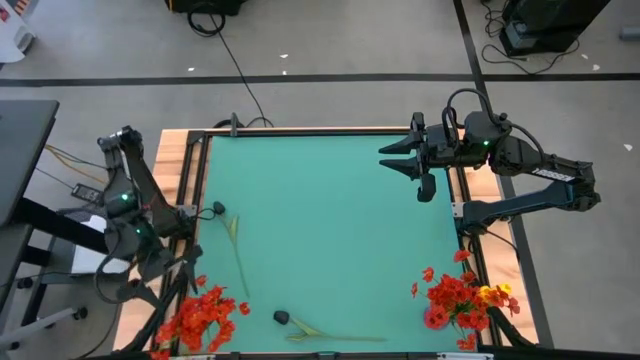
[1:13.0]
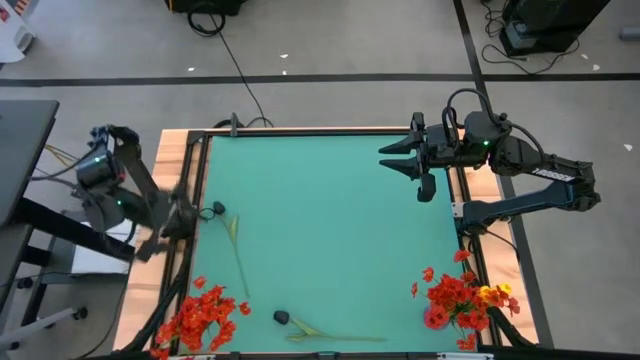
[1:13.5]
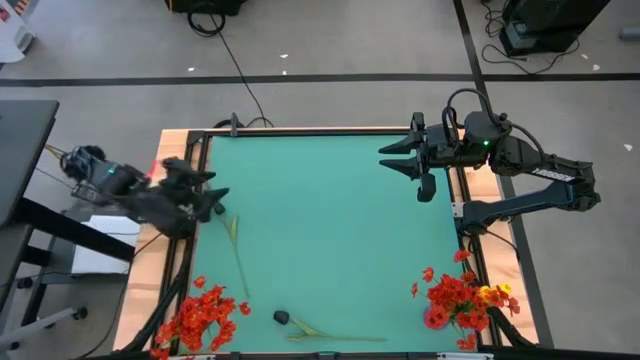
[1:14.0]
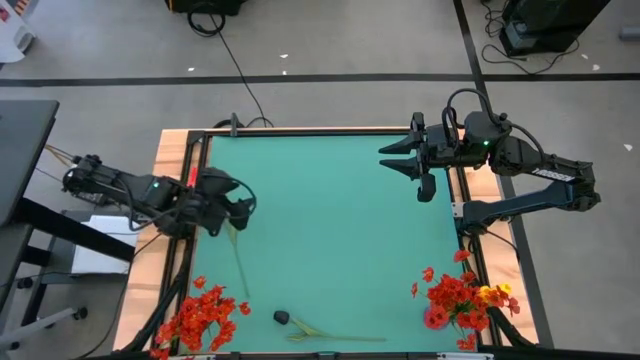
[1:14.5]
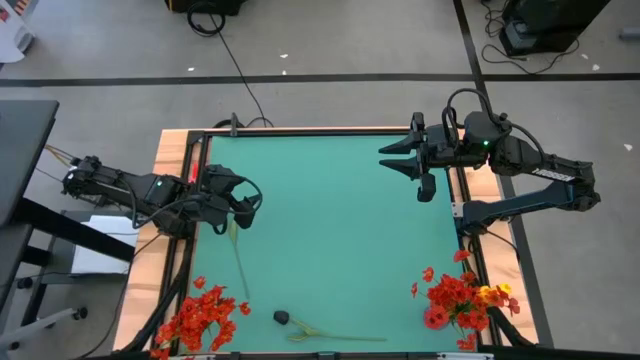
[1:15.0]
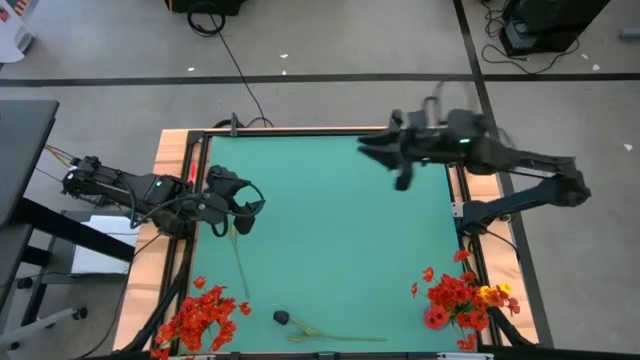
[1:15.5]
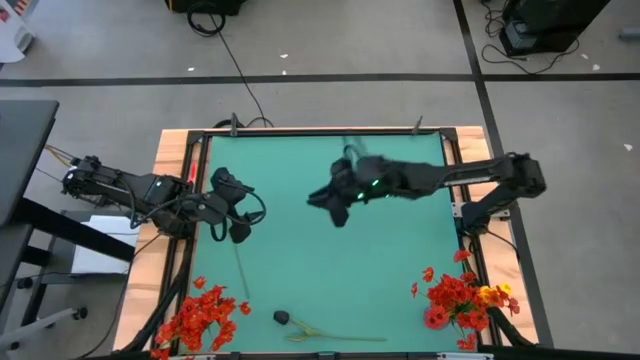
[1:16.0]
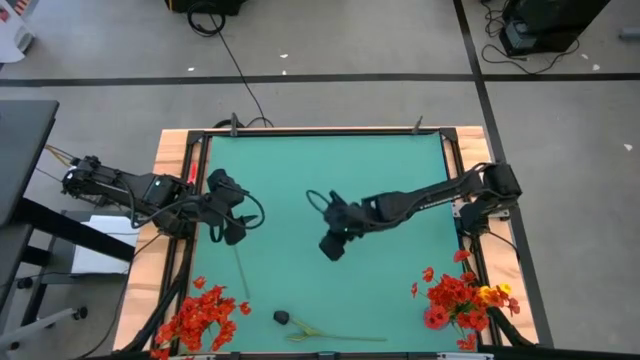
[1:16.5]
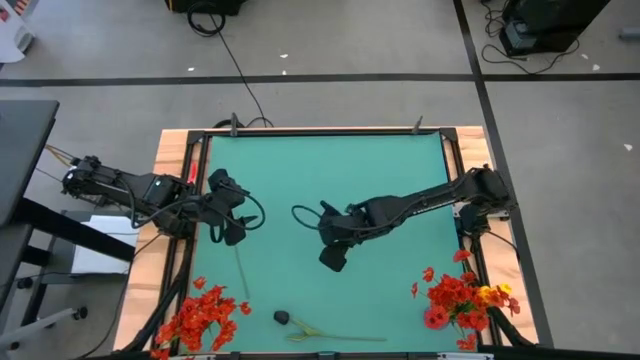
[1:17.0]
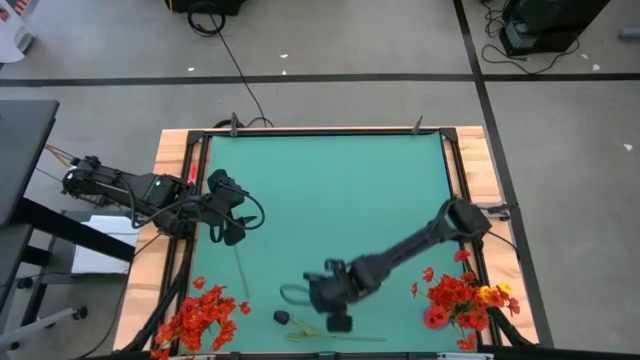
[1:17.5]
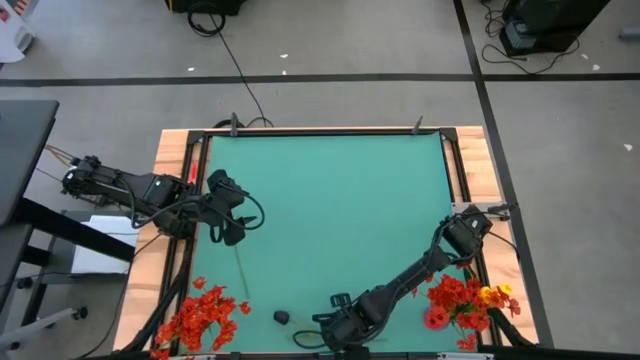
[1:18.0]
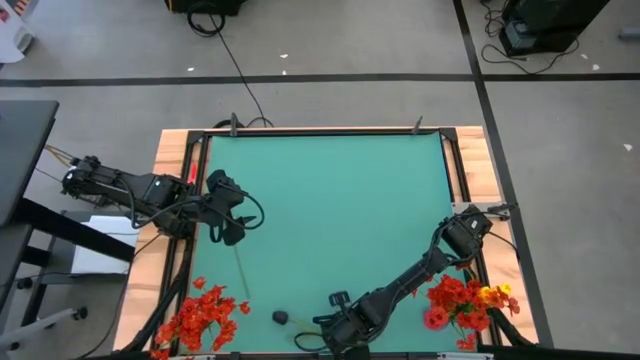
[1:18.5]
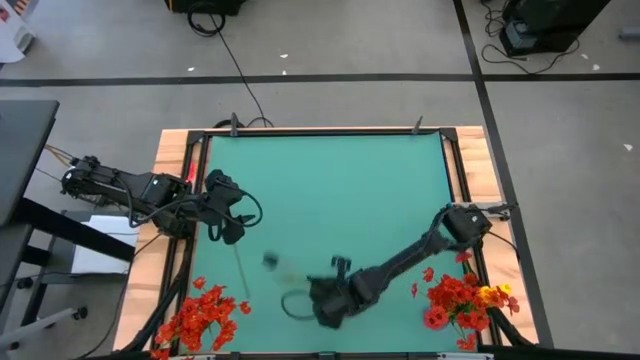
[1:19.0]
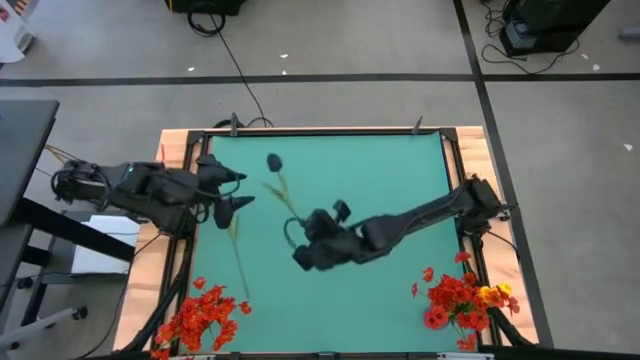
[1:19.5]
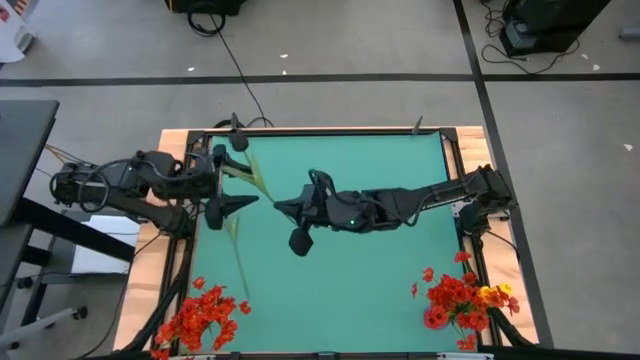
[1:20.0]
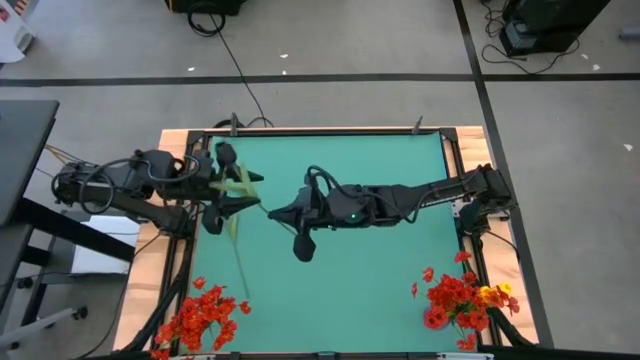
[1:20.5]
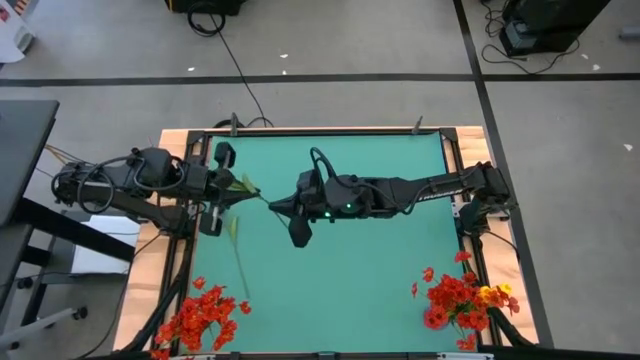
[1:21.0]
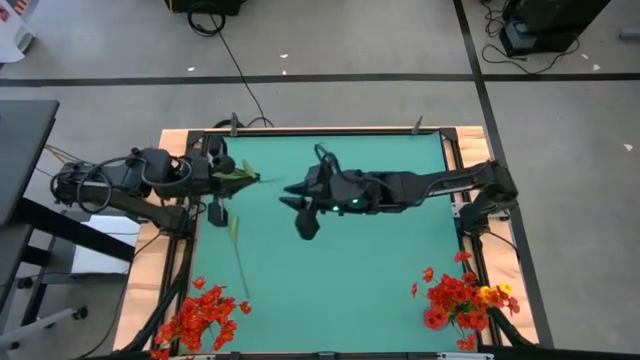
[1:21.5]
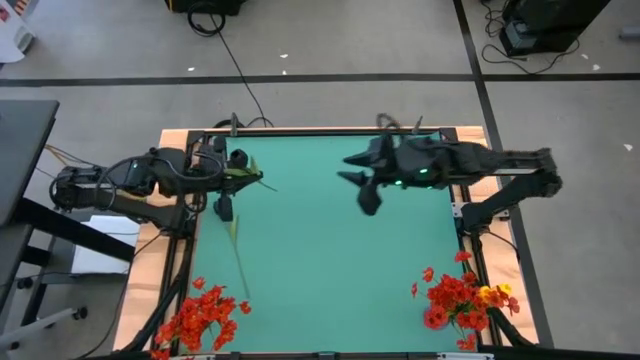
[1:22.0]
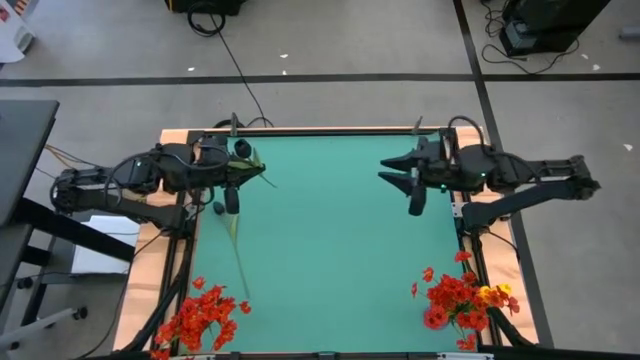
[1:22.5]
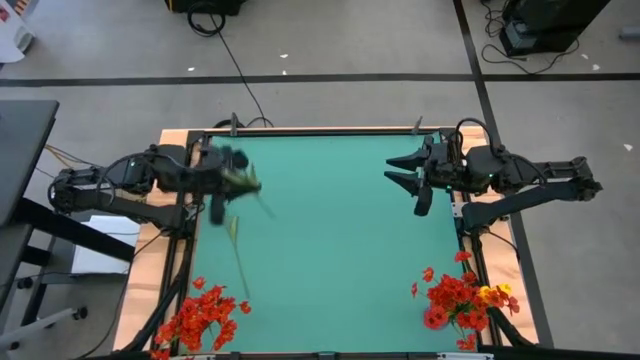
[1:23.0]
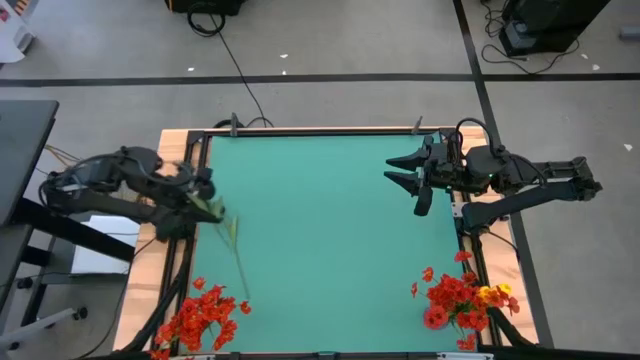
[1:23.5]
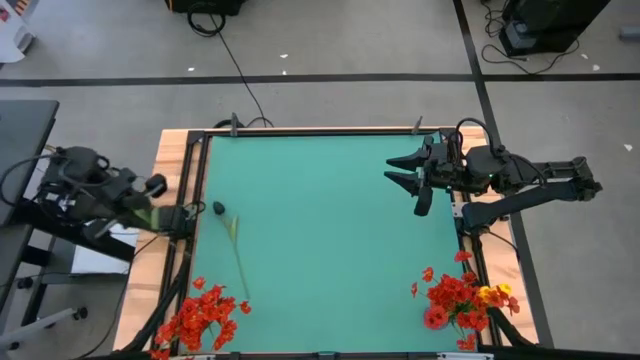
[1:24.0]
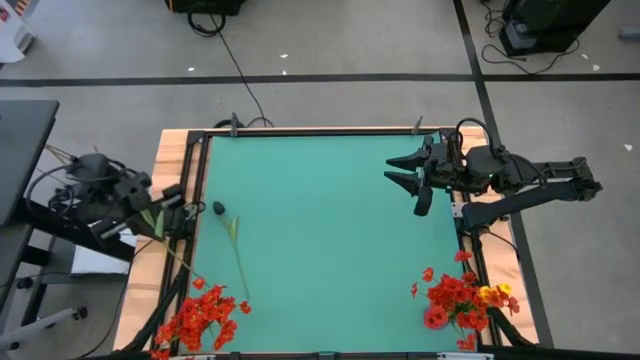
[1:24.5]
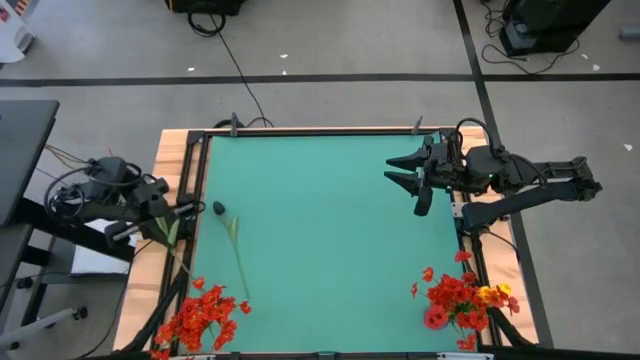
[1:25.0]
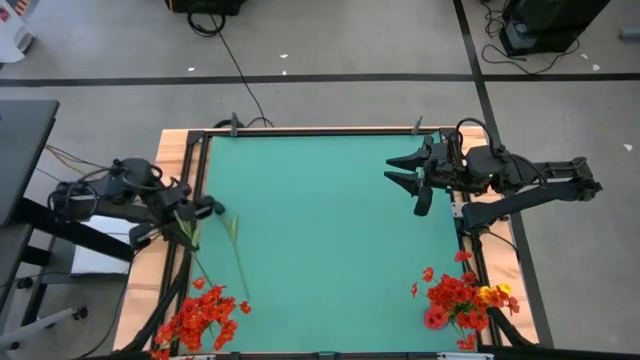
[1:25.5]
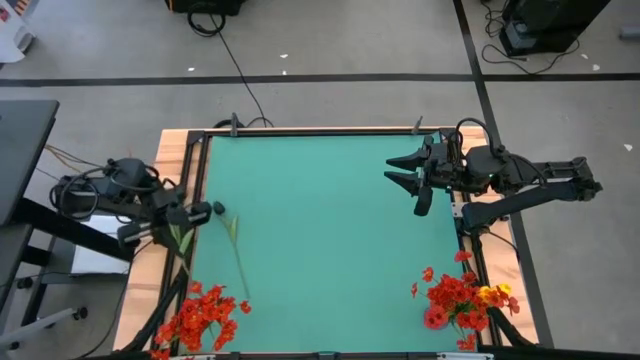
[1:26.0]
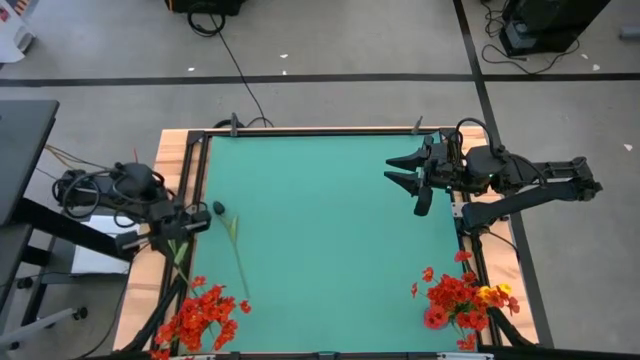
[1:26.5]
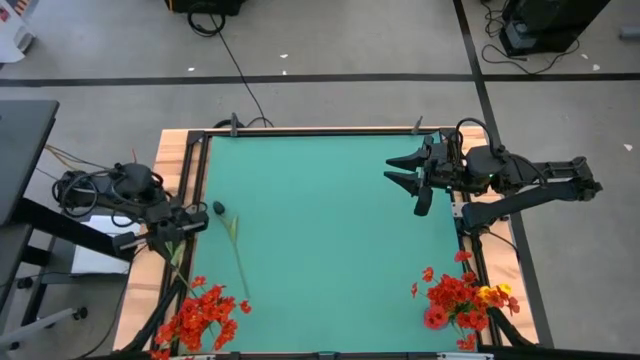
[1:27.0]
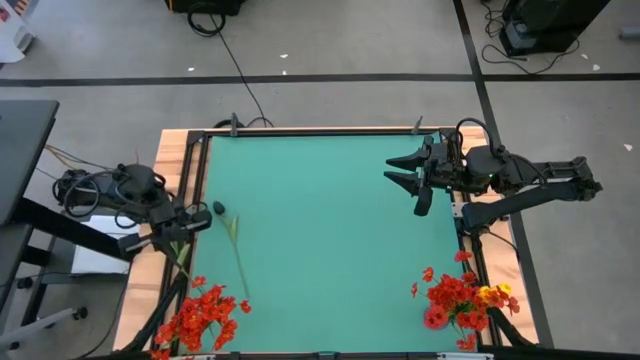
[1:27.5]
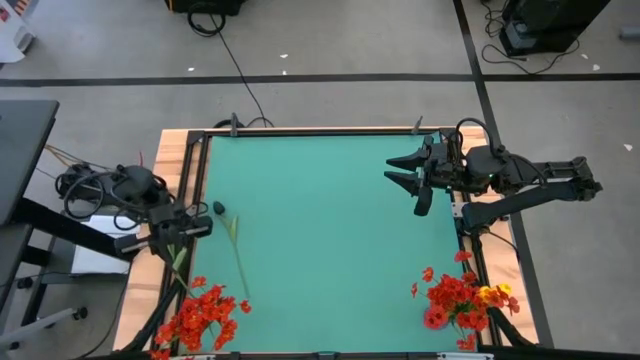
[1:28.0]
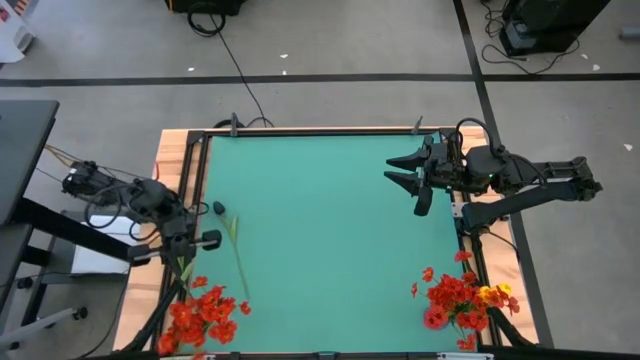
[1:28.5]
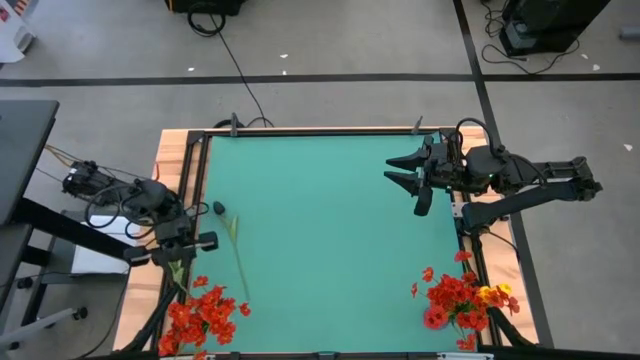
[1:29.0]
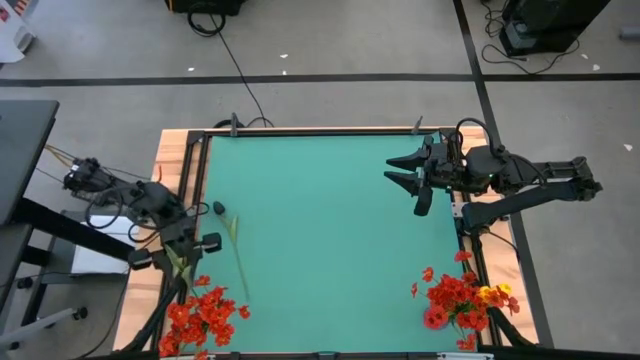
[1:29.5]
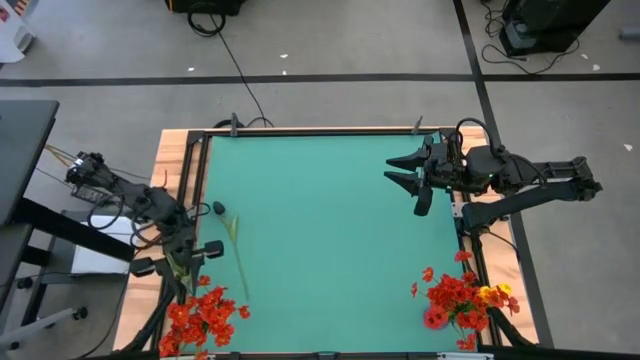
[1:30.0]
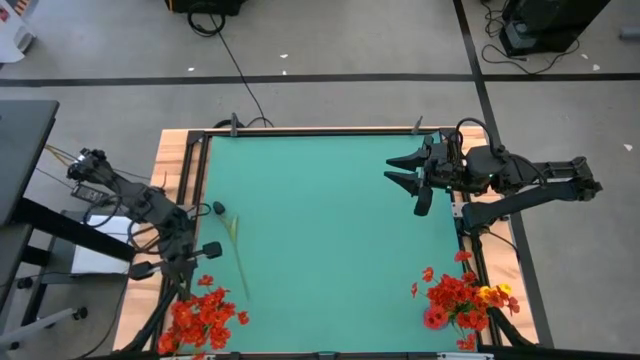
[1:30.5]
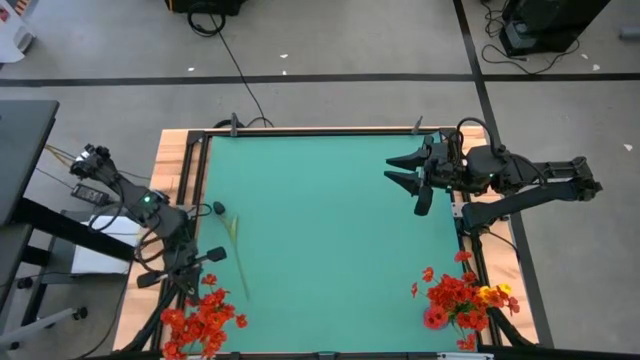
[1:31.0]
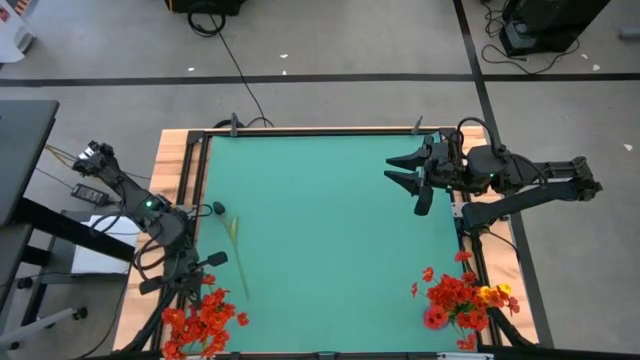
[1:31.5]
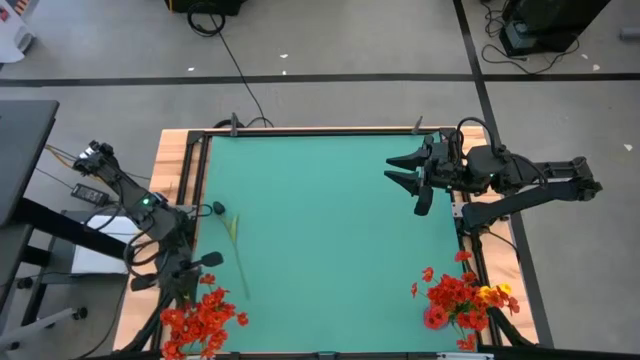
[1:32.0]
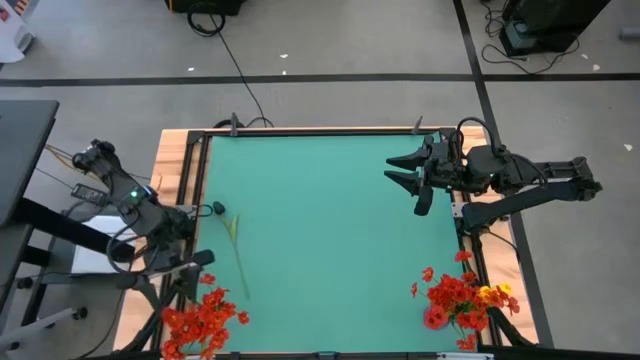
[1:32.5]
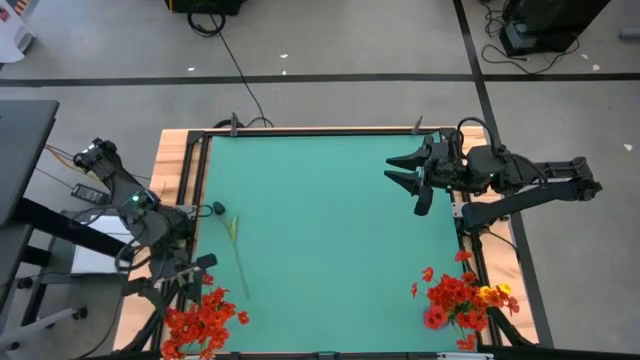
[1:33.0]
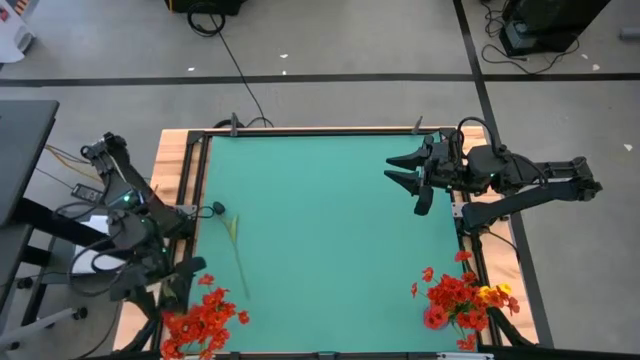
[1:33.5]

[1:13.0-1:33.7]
Task: Sort flowers into vase by color
Put the bottom black tulip into the transparent vase
